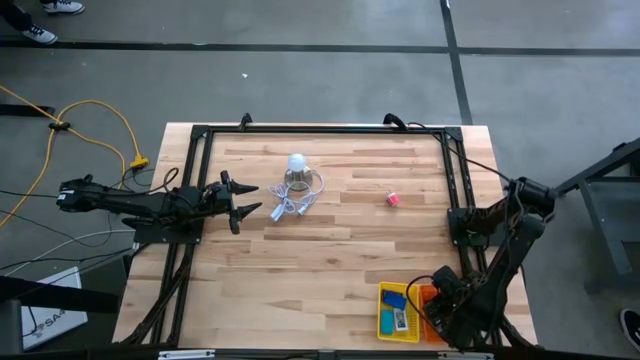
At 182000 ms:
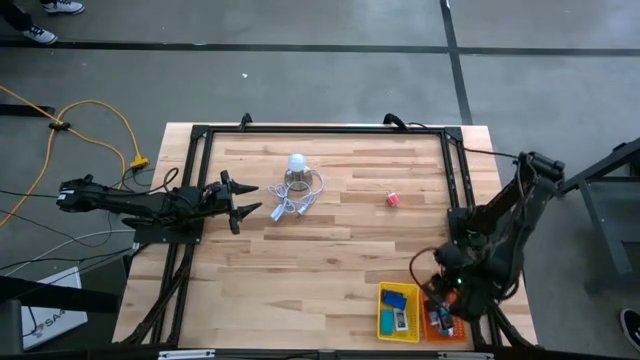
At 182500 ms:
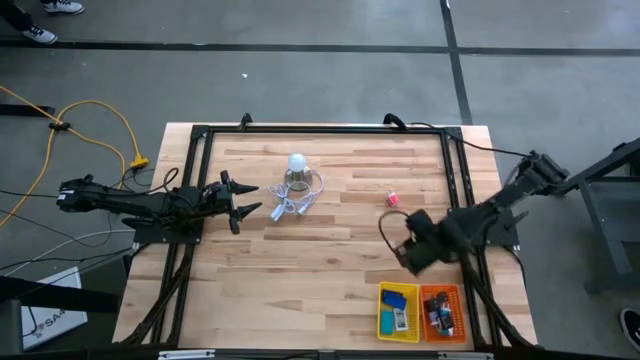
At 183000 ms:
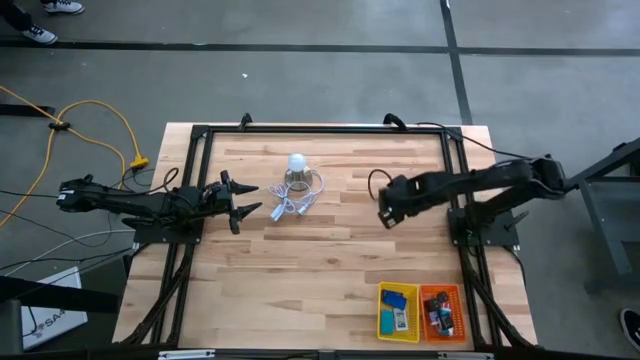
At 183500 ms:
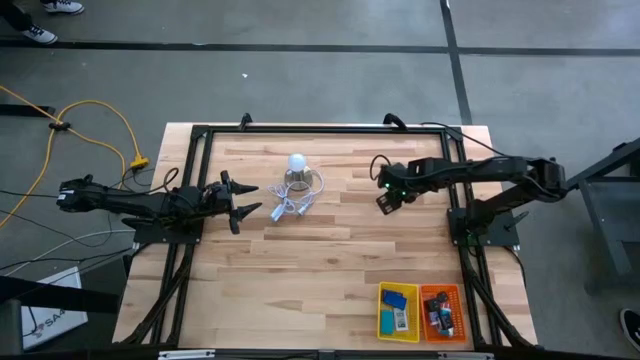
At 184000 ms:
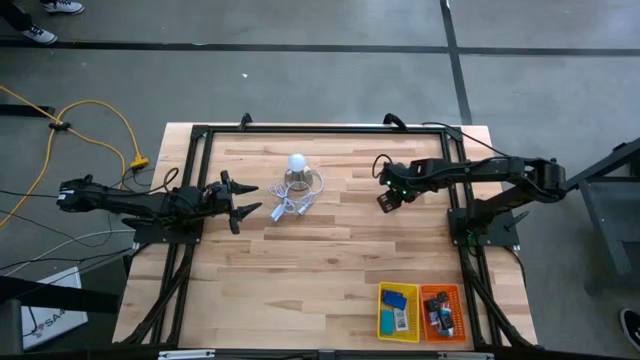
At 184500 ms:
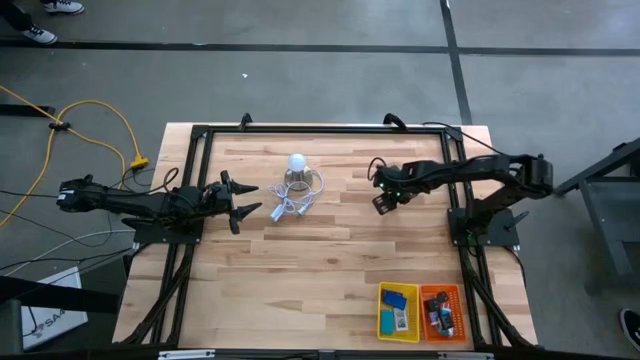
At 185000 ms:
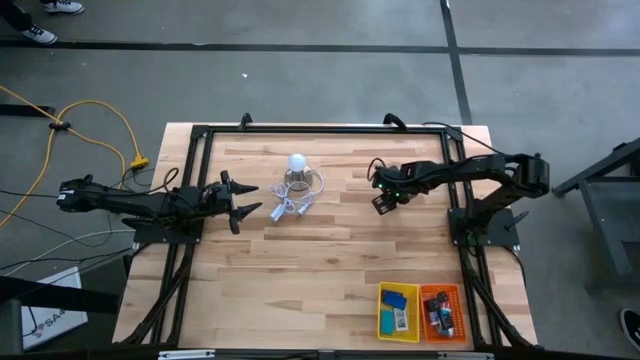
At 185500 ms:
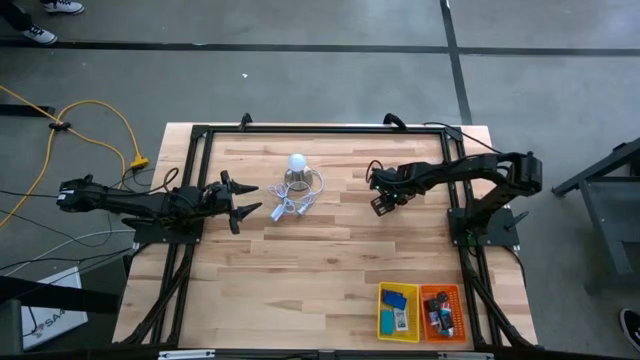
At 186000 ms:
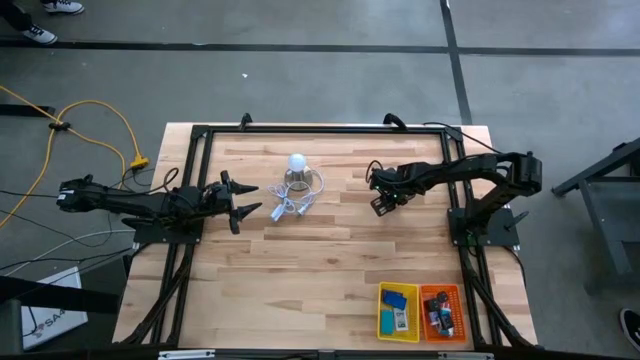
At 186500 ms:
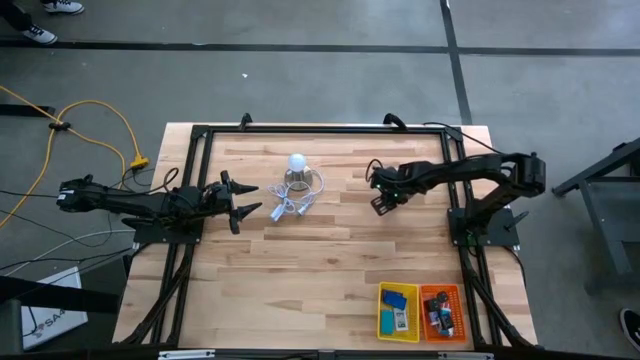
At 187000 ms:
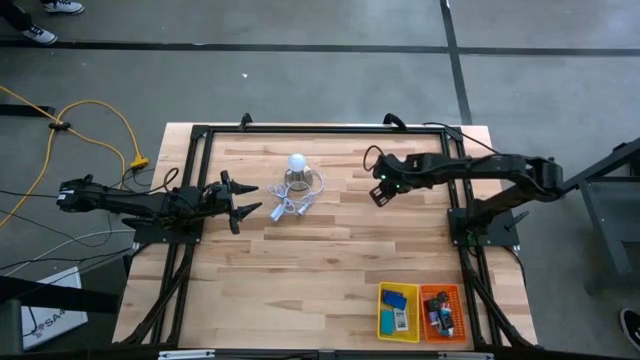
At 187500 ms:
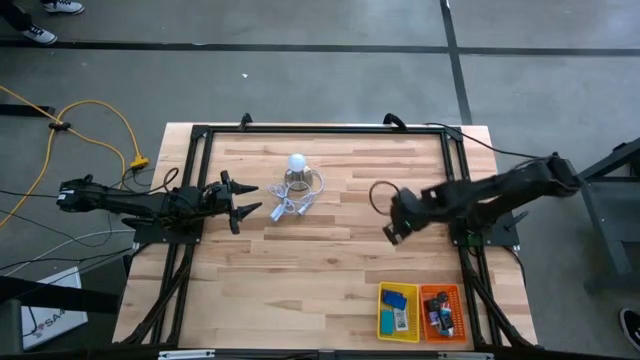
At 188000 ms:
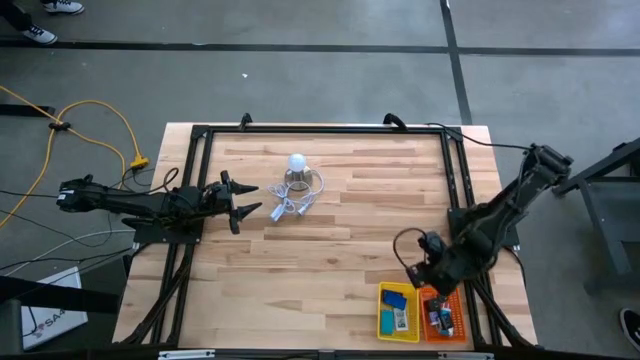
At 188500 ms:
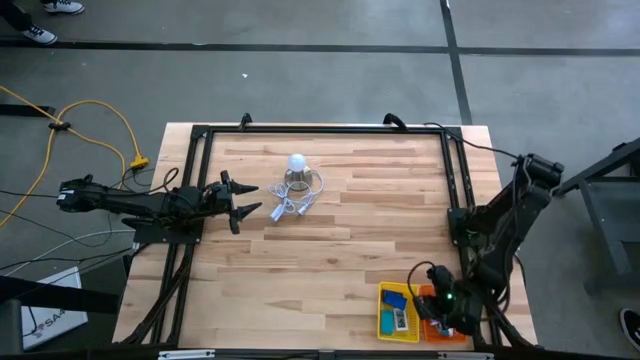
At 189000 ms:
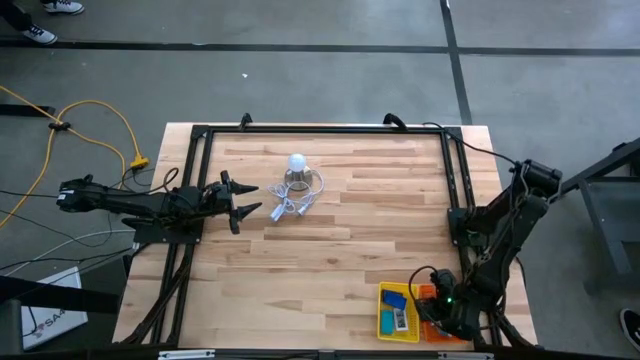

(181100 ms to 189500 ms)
Task: Pick & Place Office items
Put the pink charger adapter into the orange basket

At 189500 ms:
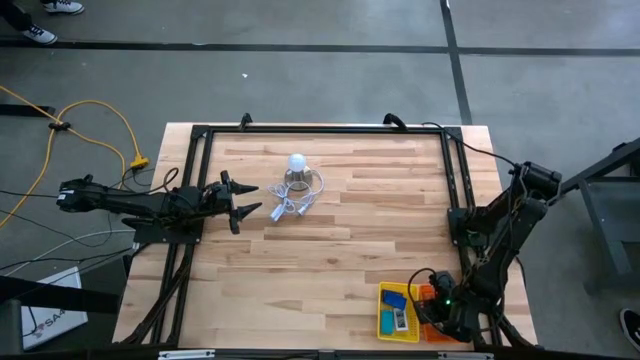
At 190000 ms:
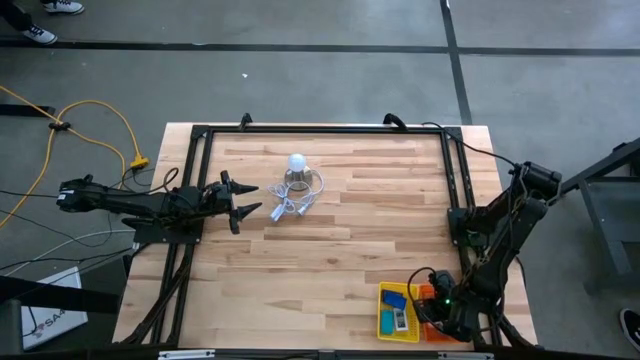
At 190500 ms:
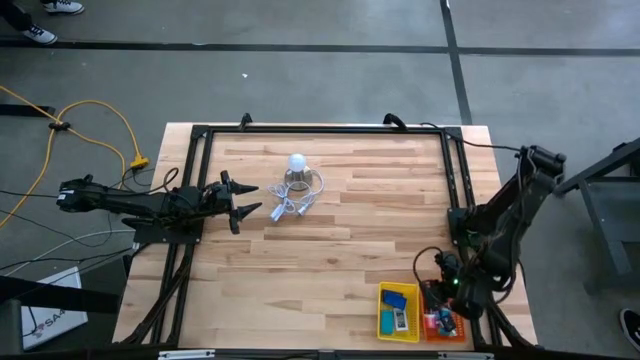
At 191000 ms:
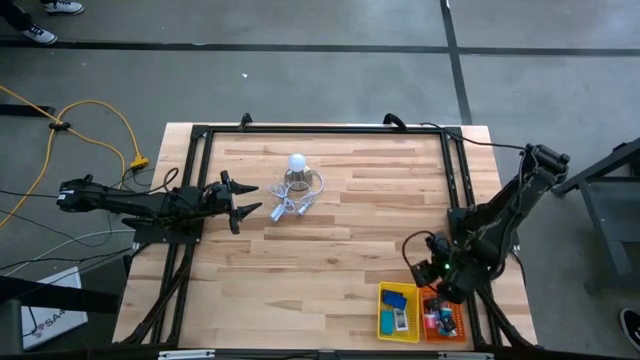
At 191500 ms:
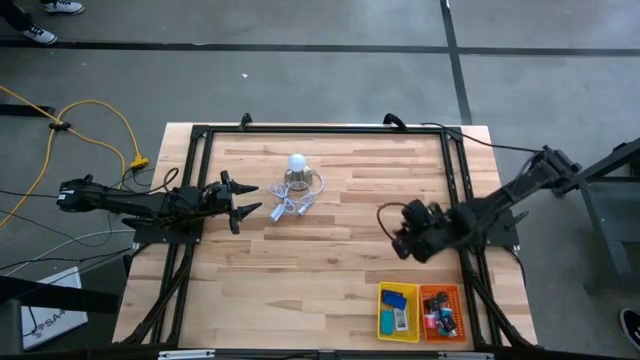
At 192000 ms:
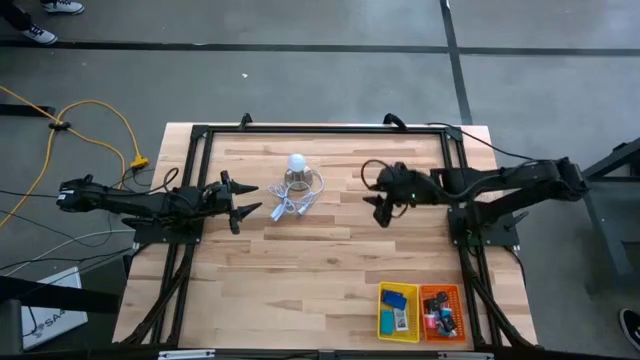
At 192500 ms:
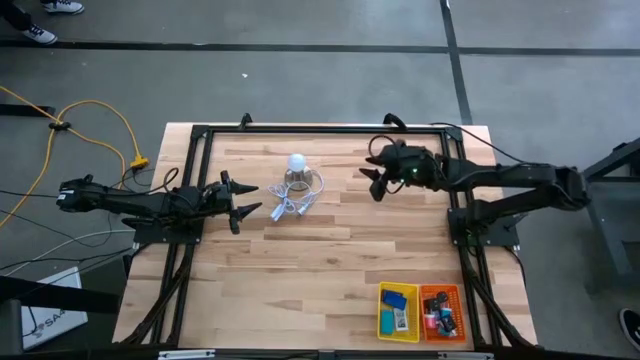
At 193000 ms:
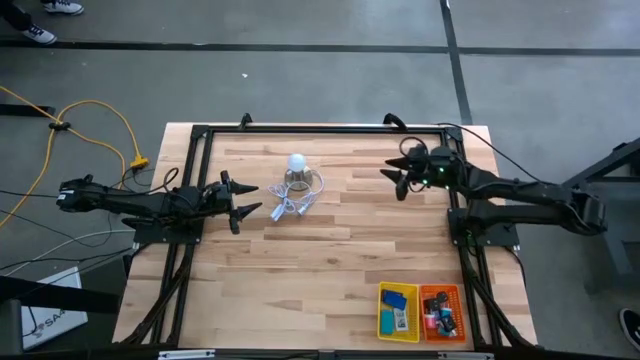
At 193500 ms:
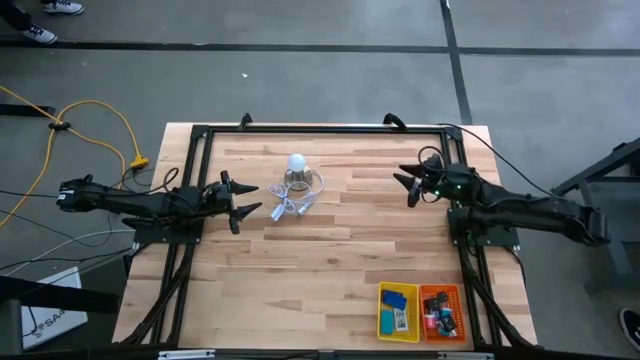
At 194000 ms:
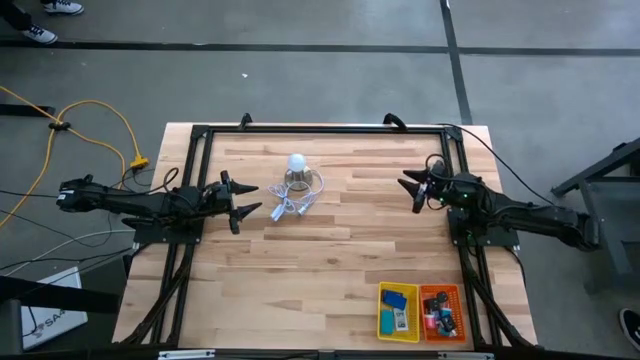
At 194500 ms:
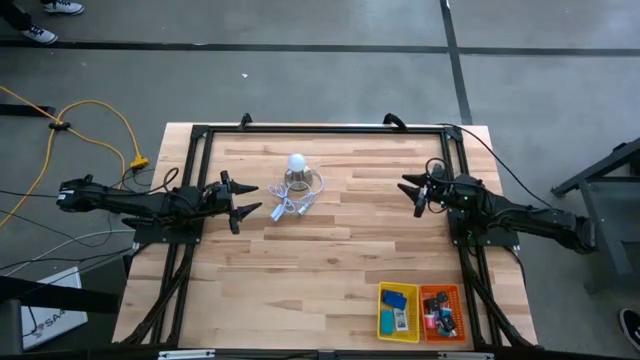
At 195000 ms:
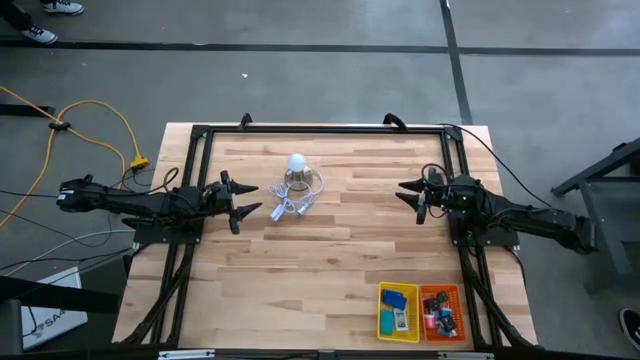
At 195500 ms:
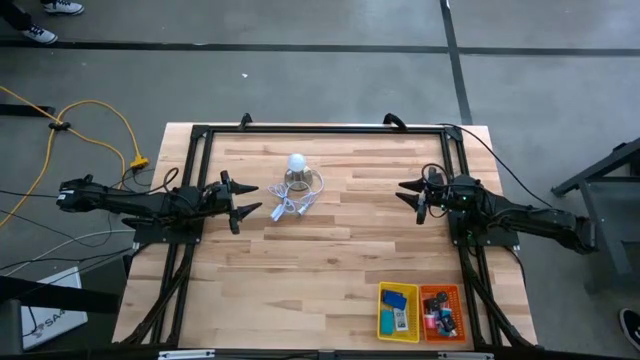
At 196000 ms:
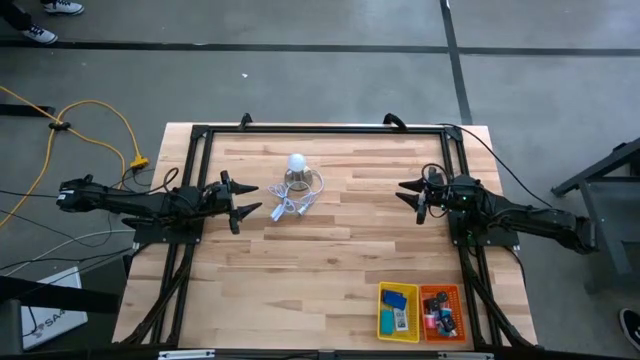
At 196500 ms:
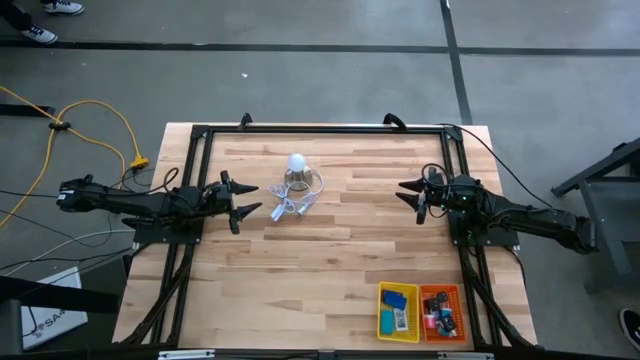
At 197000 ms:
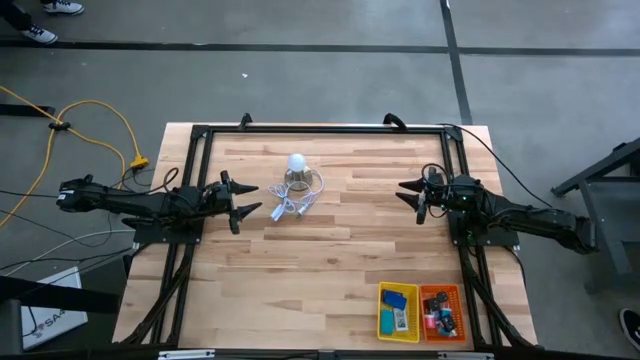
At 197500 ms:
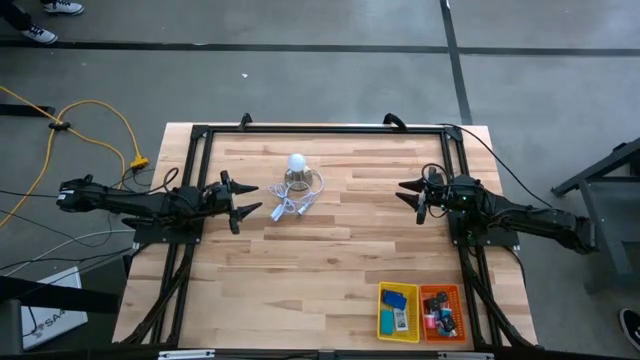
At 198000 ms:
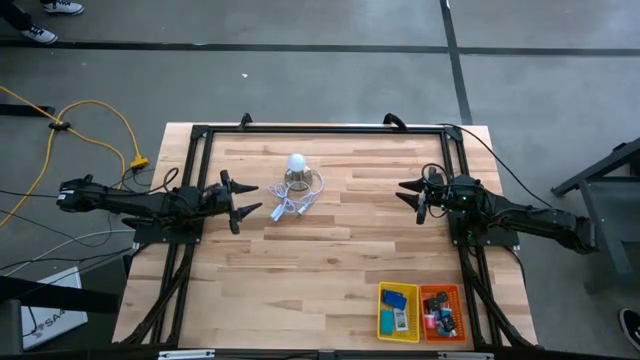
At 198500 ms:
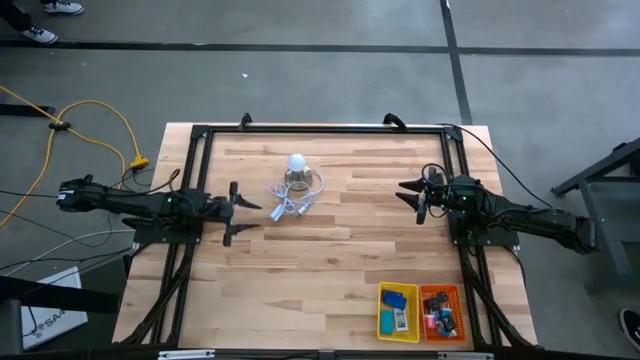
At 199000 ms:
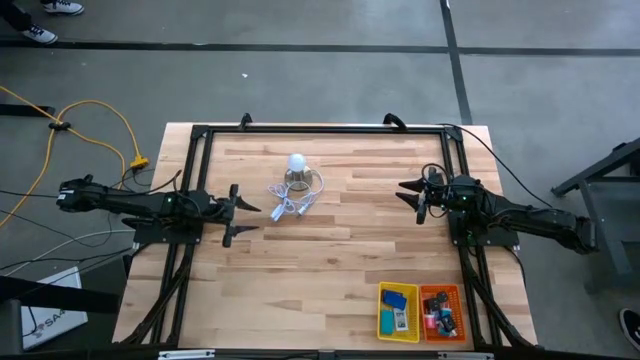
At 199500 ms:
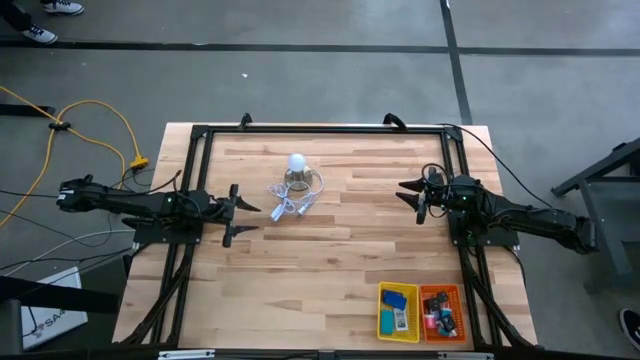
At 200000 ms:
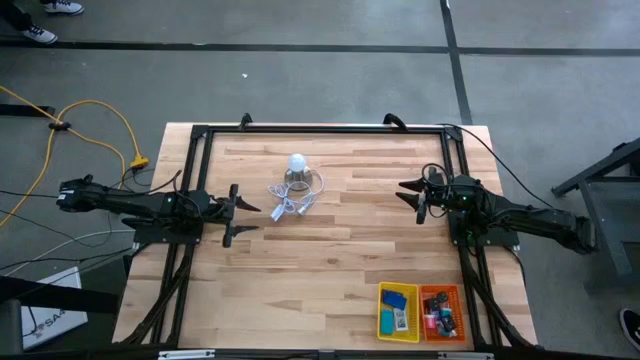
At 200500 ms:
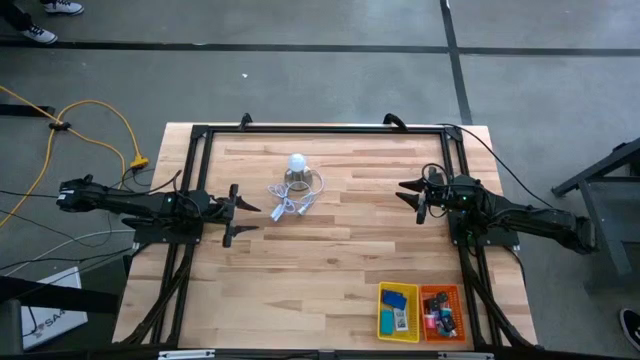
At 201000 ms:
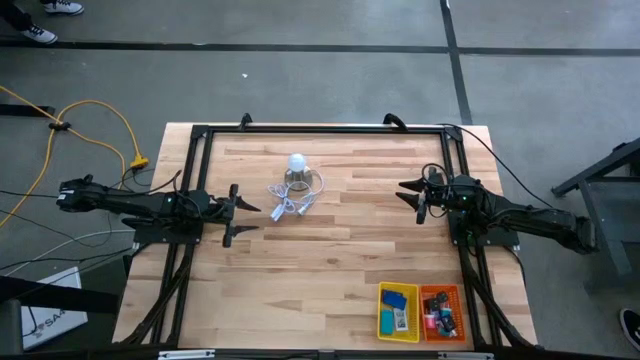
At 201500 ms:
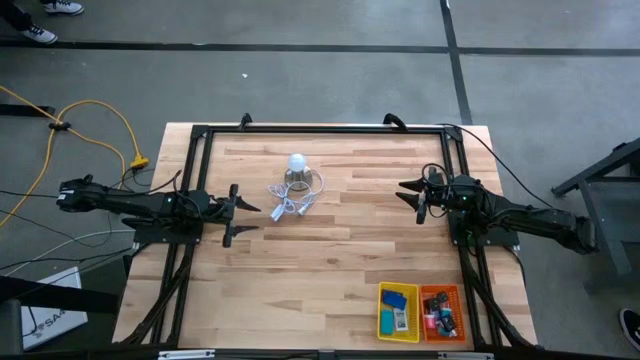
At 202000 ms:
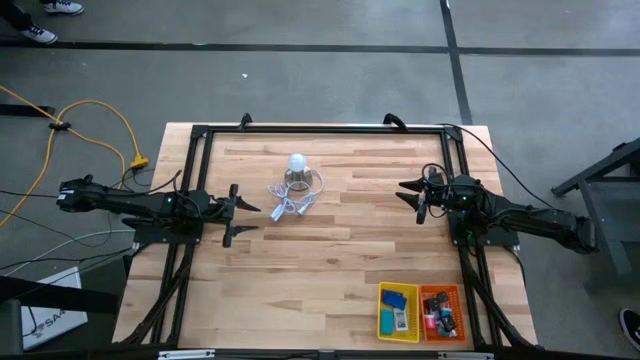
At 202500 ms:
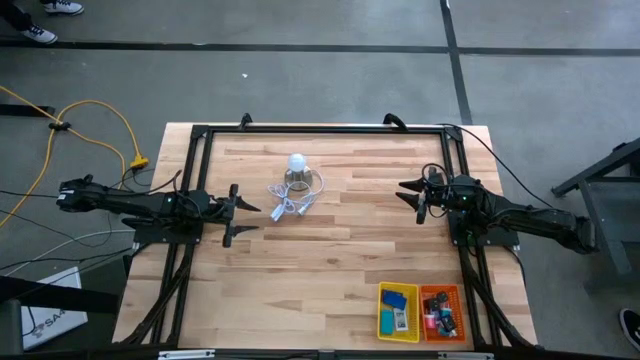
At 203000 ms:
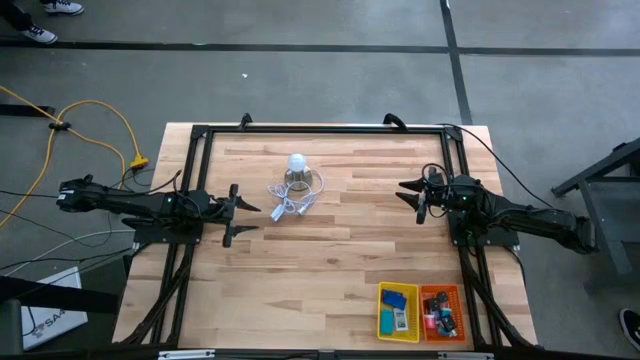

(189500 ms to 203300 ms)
Return to Home Position
